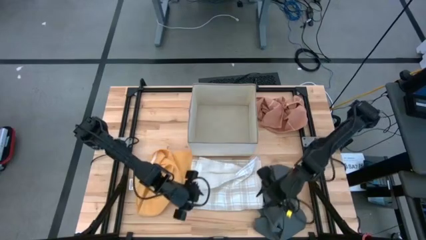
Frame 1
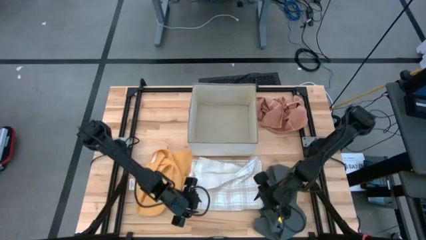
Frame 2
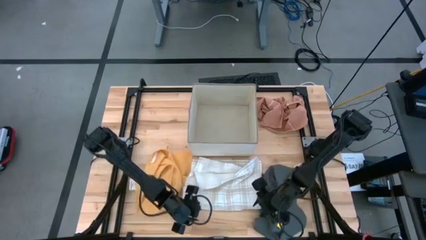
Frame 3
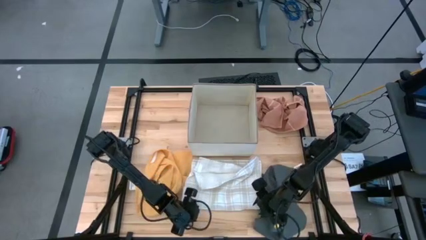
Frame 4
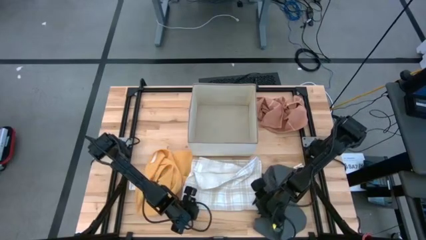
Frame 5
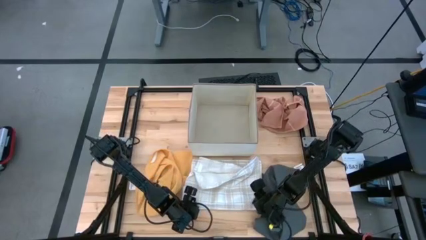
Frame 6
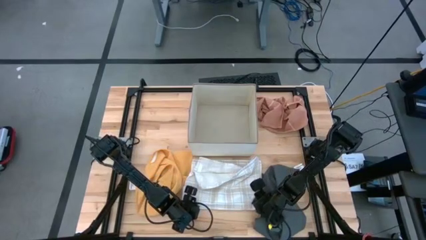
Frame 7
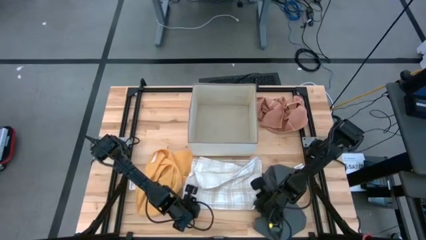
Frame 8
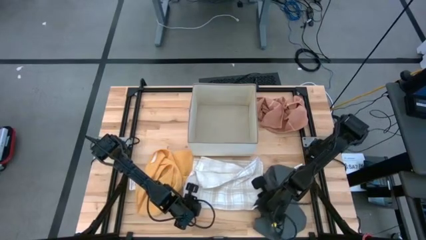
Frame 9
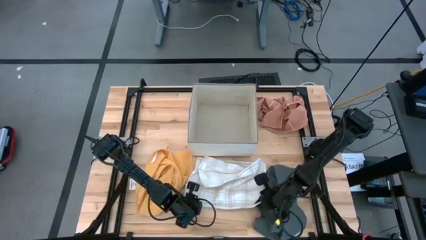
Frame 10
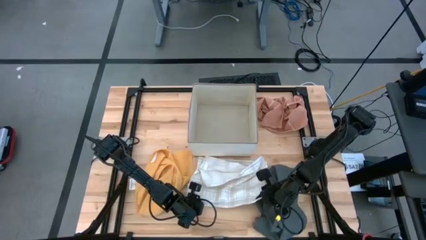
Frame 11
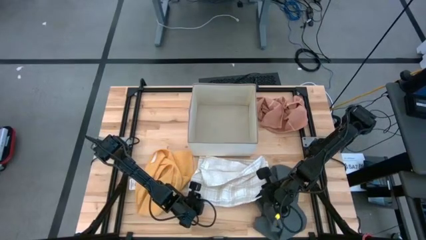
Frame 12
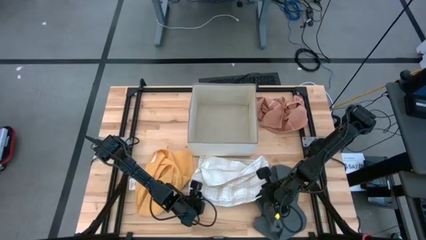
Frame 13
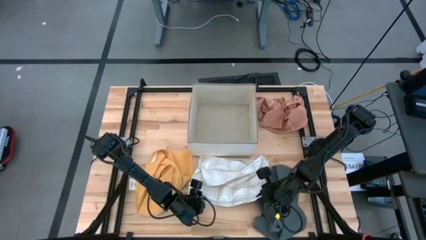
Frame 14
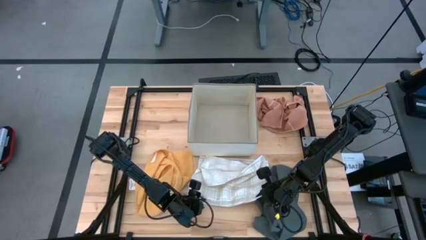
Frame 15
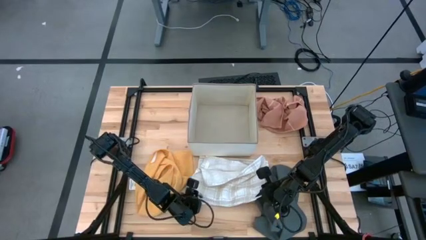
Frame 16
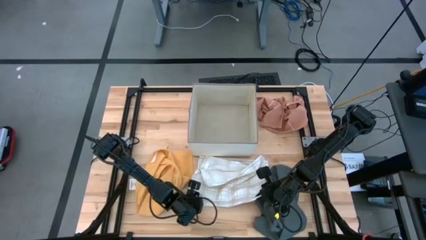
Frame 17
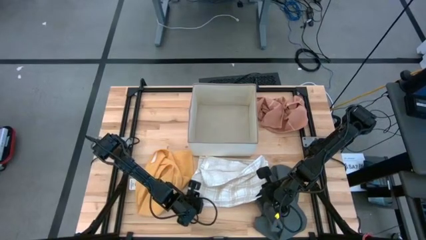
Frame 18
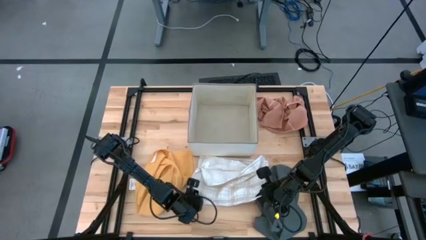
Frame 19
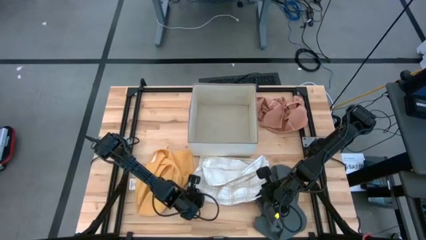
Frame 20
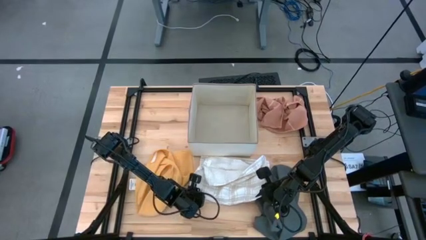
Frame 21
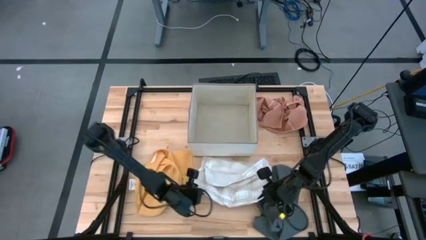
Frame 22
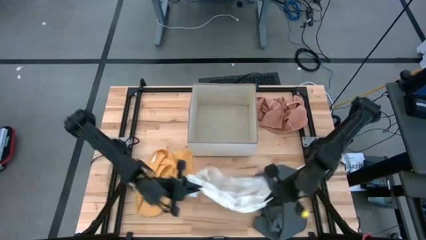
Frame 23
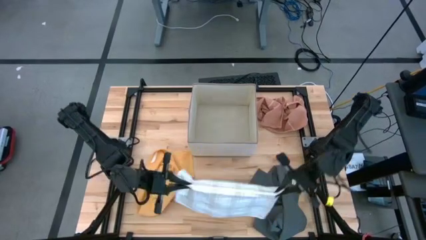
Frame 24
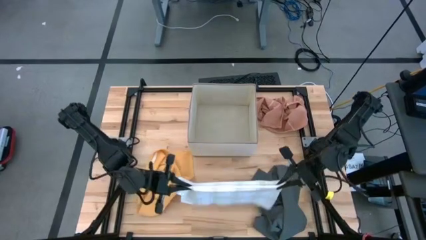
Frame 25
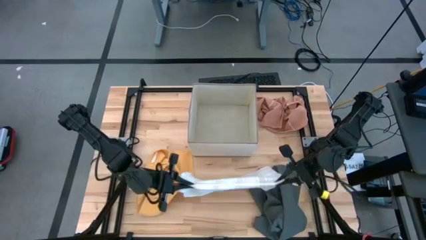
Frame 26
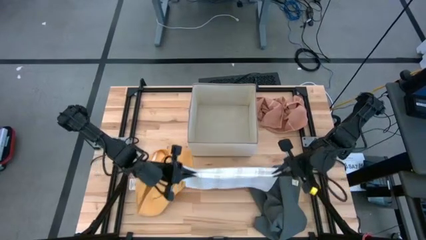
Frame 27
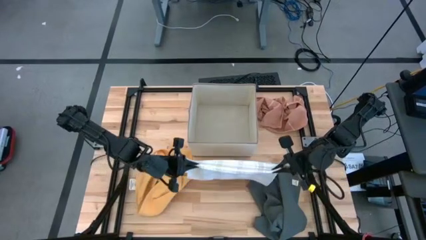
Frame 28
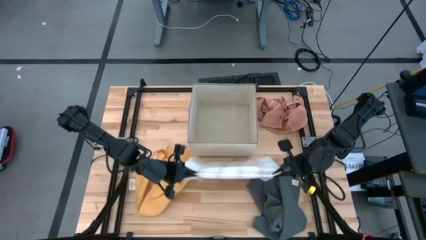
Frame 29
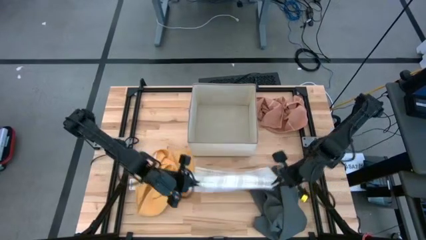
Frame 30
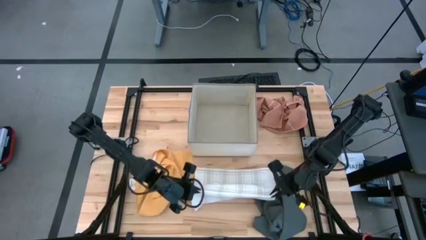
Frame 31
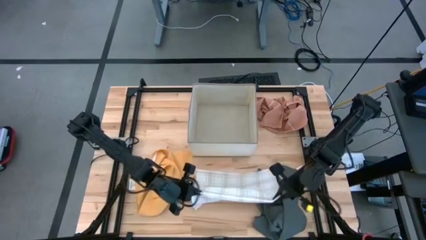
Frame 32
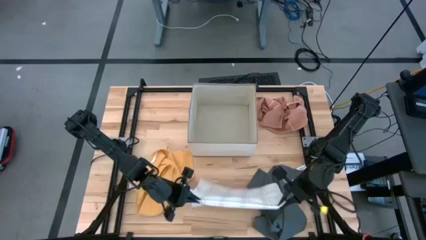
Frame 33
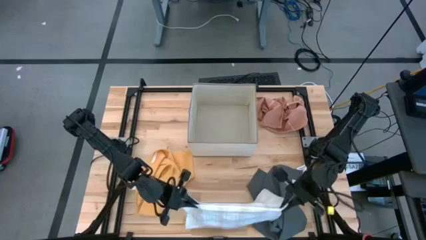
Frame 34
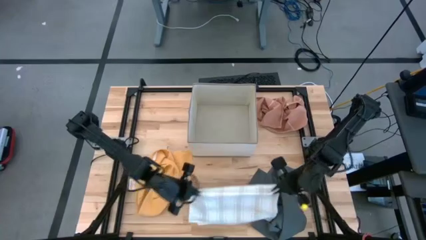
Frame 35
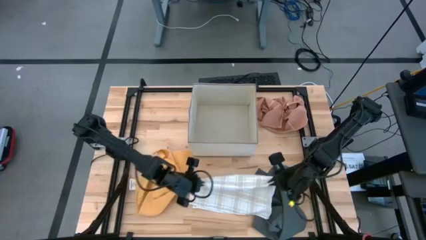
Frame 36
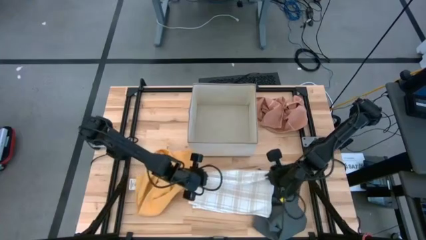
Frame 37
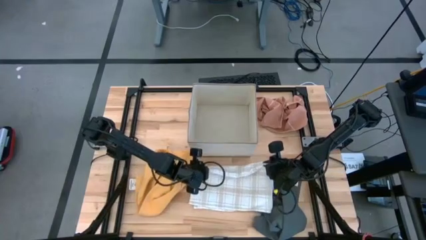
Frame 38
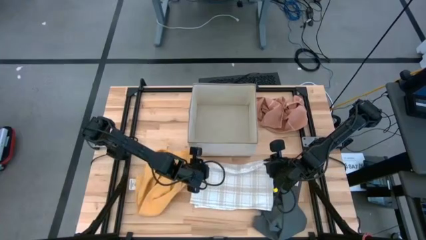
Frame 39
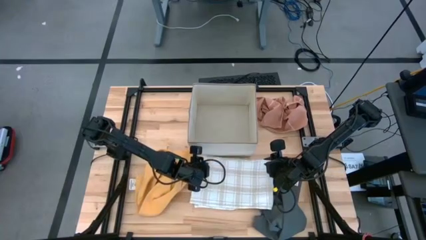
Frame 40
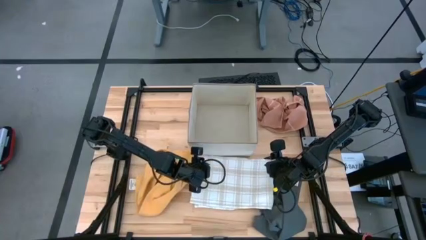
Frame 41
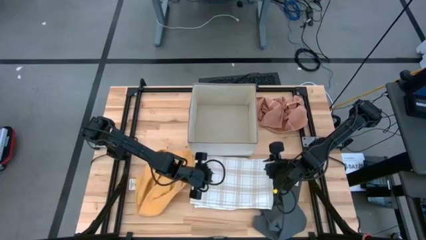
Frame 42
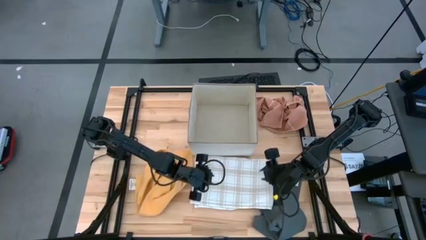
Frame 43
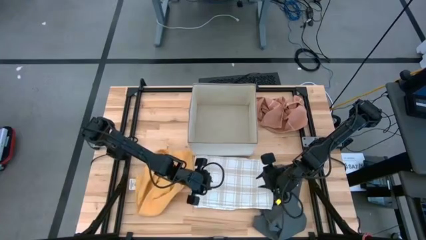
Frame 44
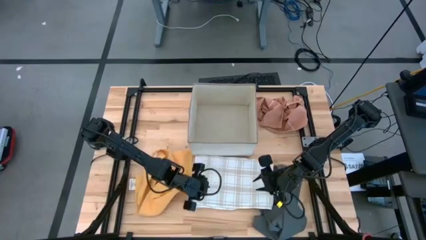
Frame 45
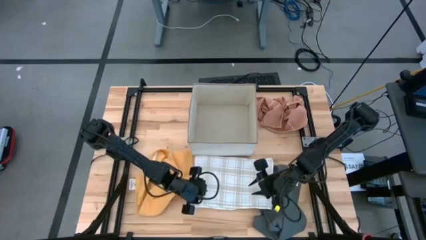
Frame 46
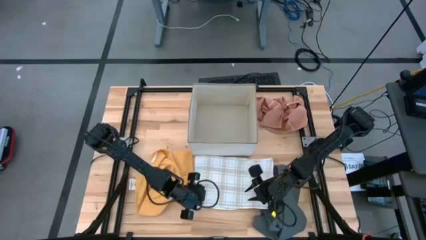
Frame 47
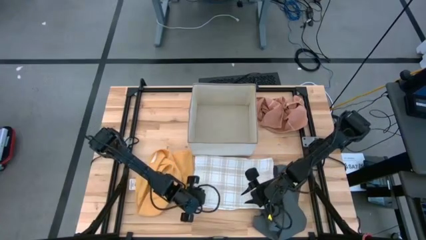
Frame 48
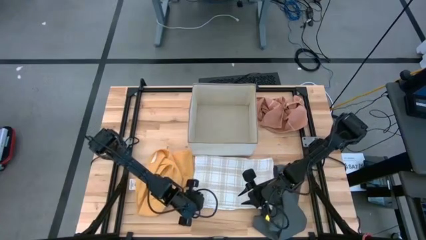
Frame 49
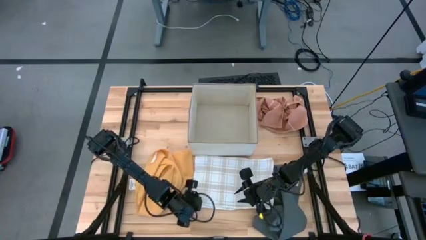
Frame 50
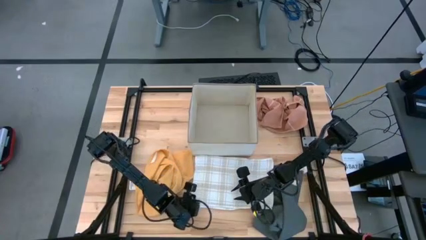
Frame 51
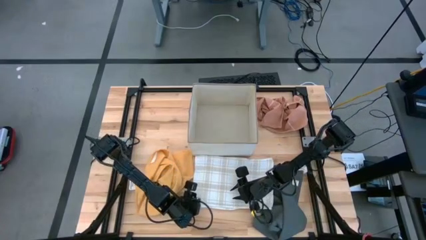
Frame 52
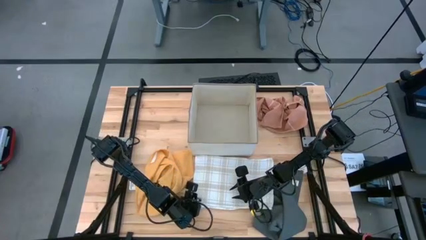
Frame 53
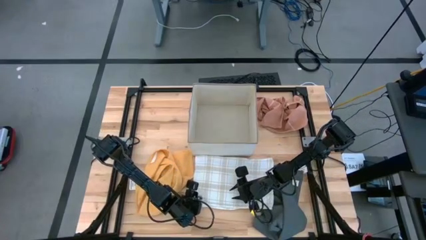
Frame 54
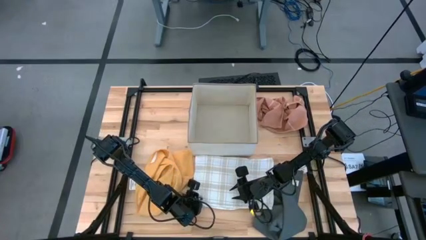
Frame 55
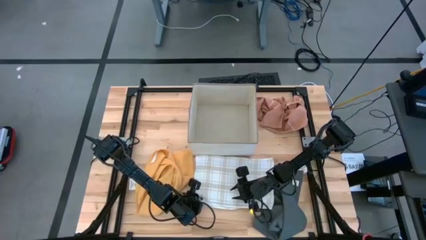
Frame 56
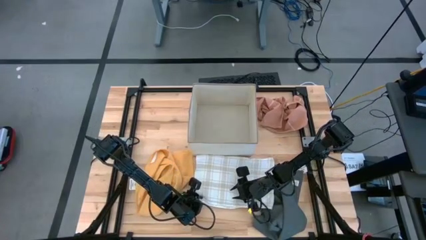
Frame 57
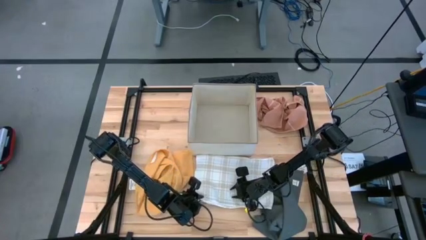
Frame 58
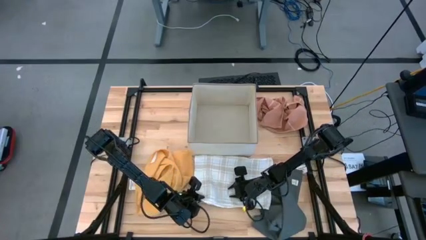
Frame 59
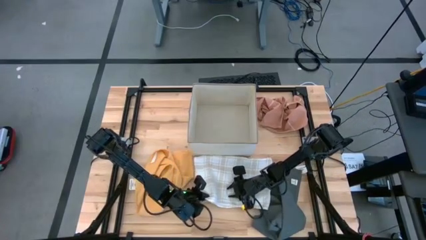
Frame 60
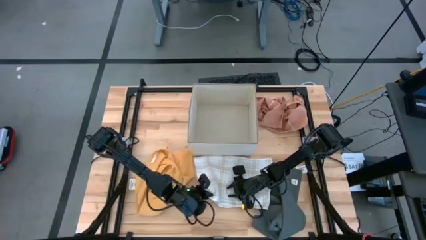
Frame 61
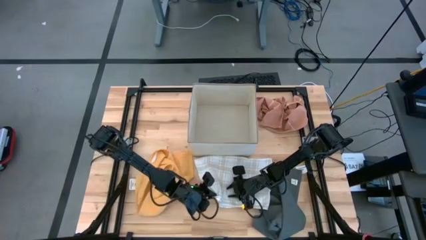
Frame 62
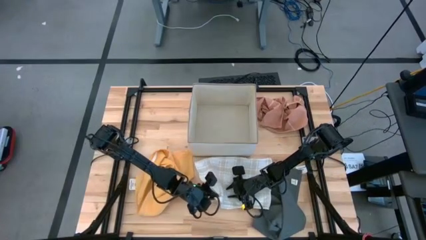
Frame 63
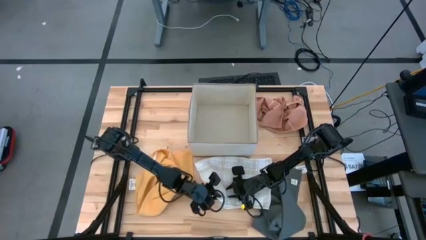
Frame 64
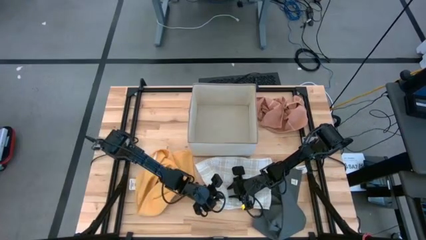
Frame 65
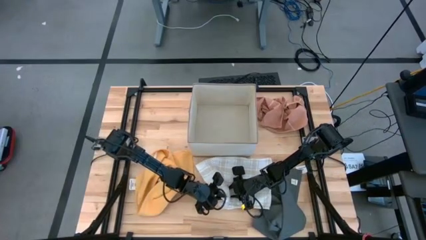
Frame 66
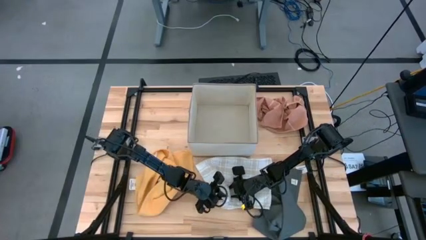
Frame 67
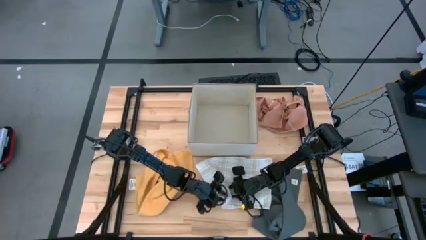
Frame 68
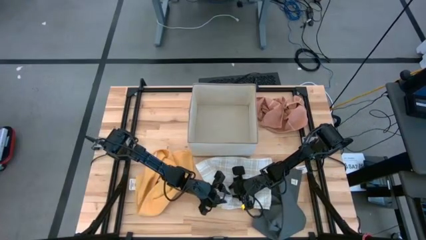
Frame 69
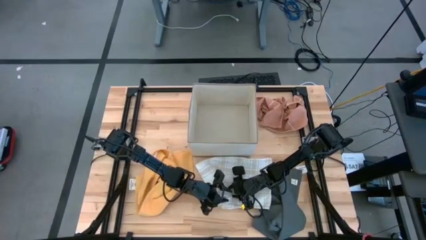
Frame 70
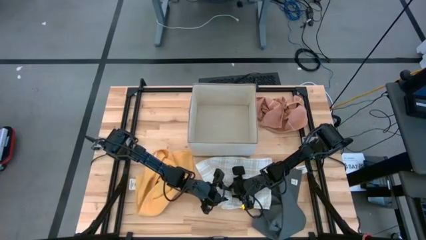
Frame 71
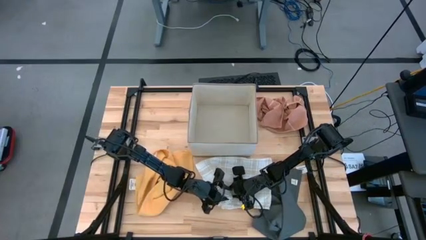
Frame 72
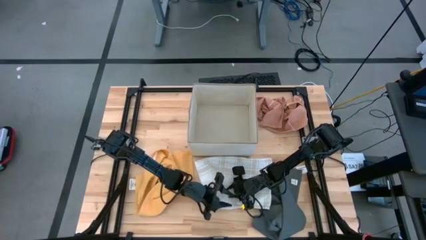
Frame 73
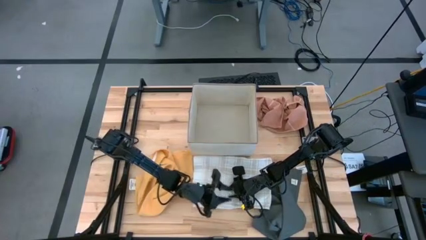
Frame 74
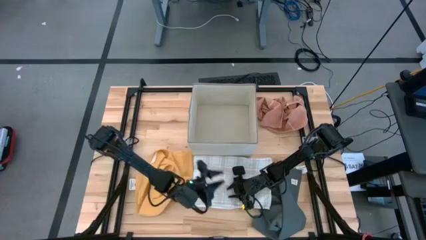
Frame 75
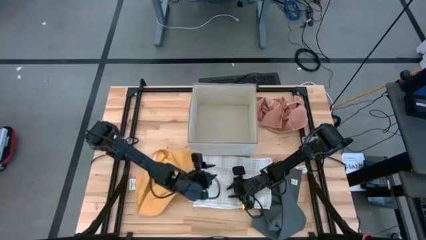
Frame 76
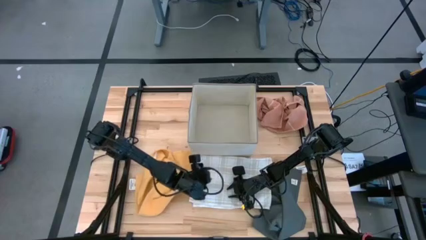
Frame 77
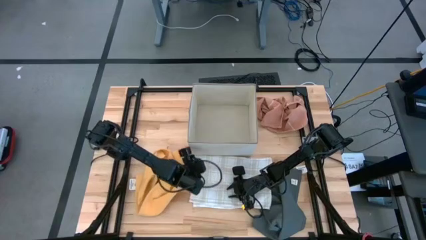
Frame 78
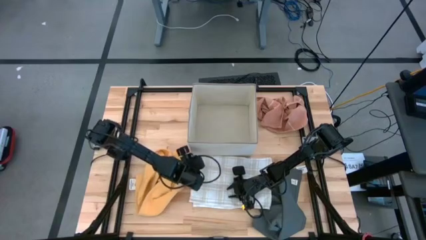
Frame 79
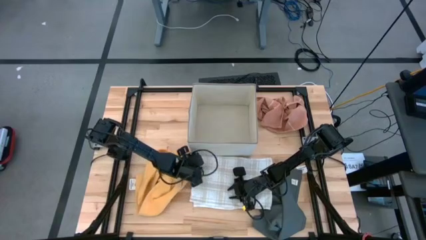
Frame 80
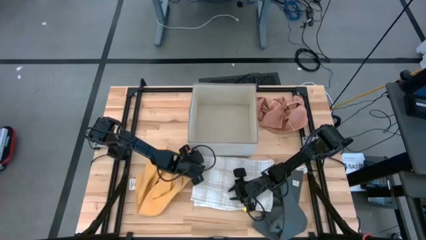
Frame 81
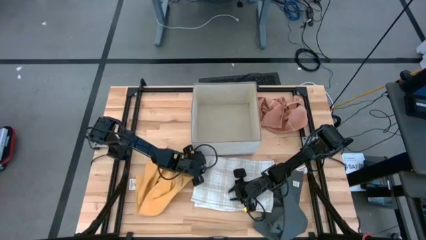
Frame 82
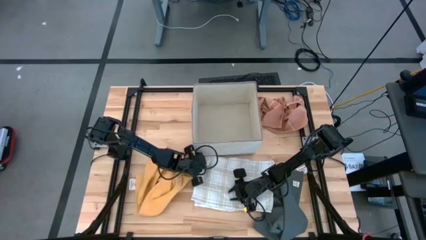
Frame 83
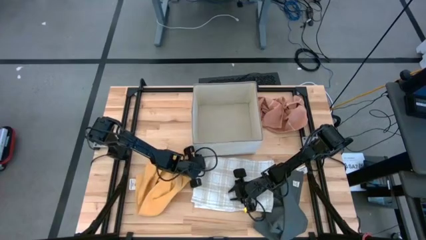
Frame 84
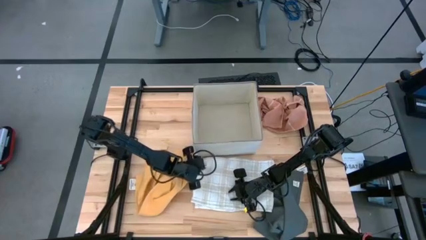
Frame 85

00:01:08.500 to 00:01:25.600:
Task: Fold towel
Fold the white towel with brown checkered lines
